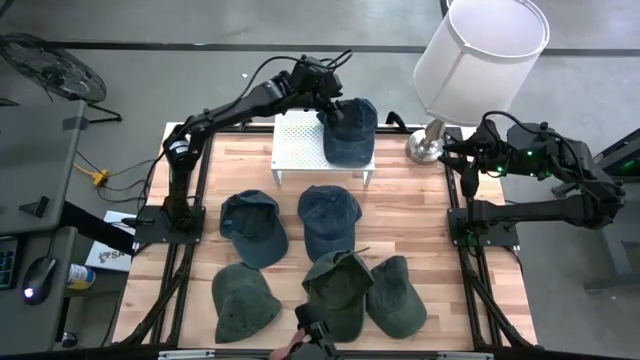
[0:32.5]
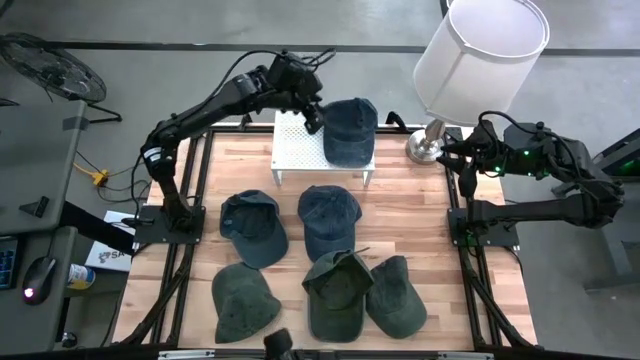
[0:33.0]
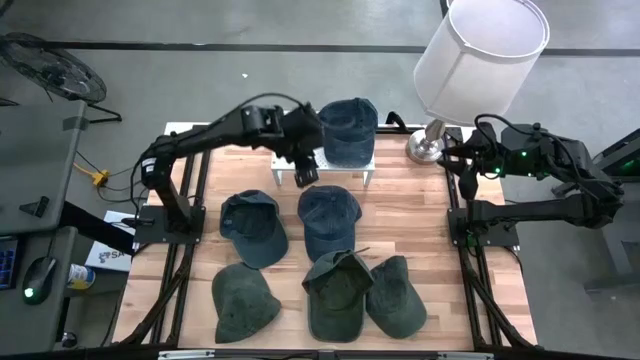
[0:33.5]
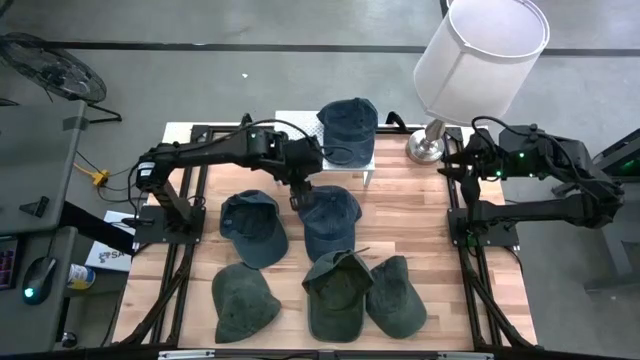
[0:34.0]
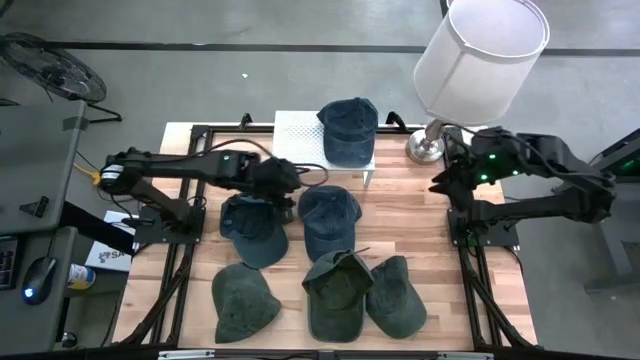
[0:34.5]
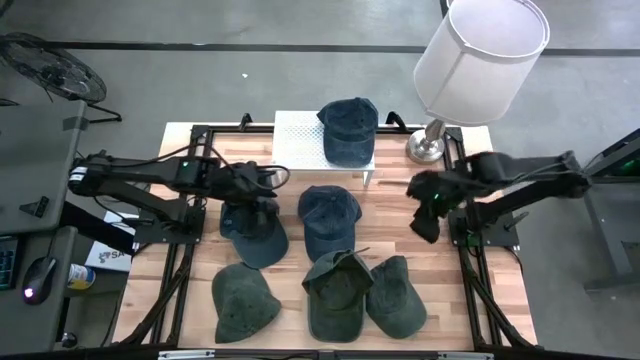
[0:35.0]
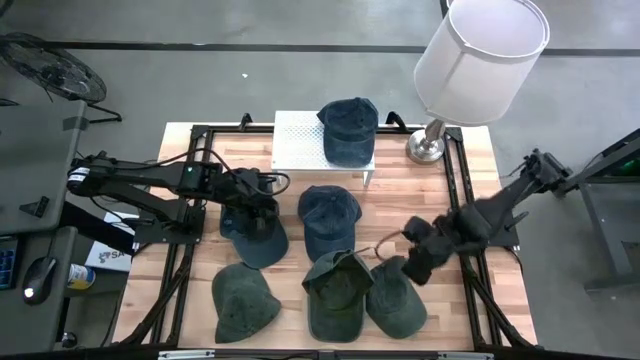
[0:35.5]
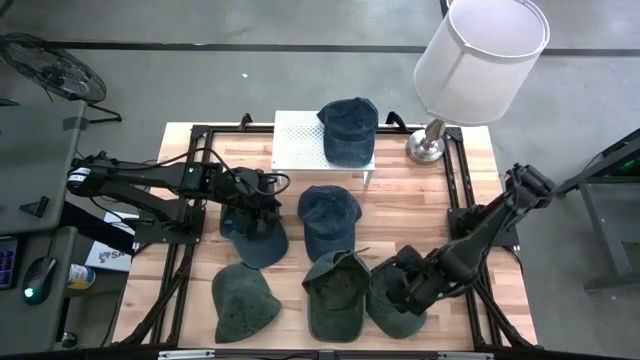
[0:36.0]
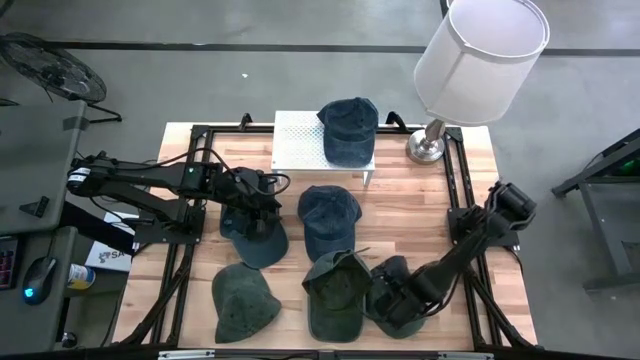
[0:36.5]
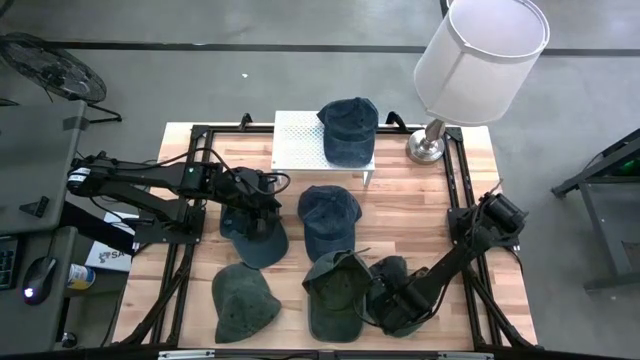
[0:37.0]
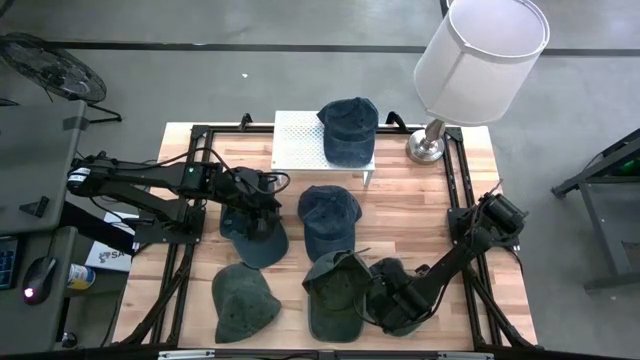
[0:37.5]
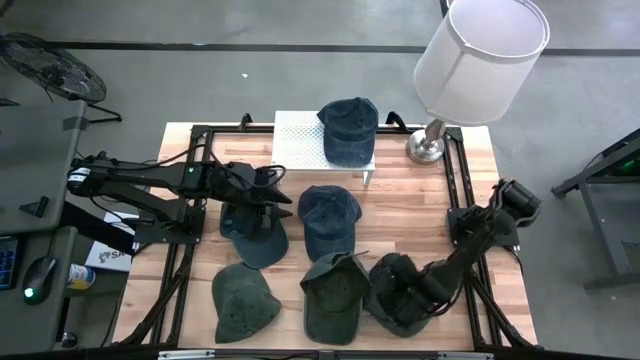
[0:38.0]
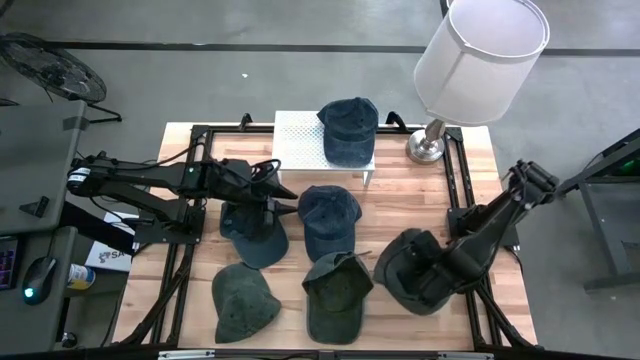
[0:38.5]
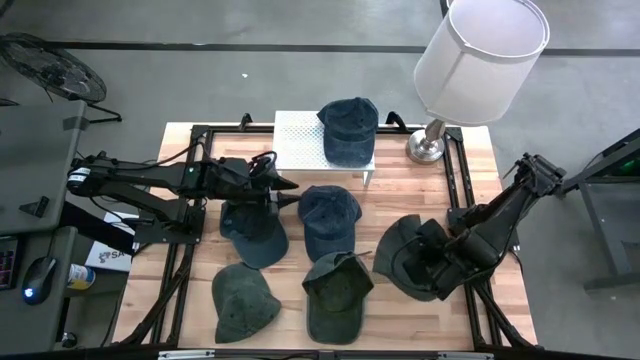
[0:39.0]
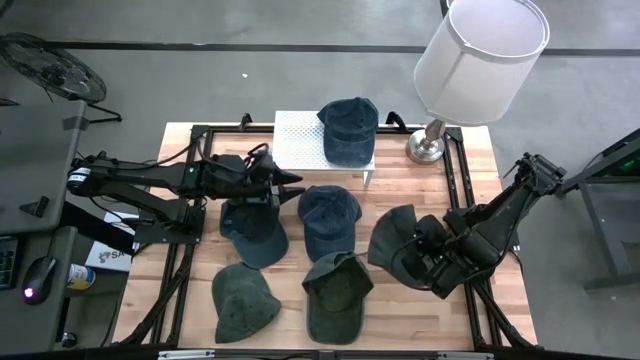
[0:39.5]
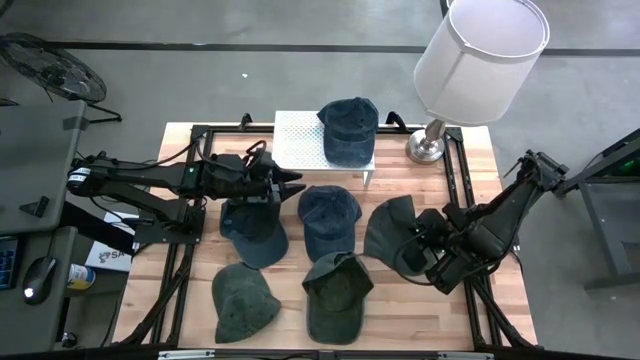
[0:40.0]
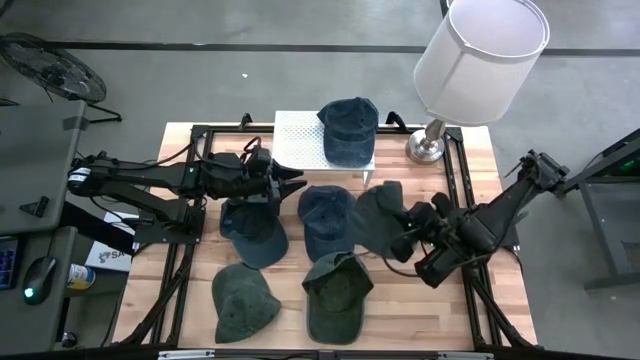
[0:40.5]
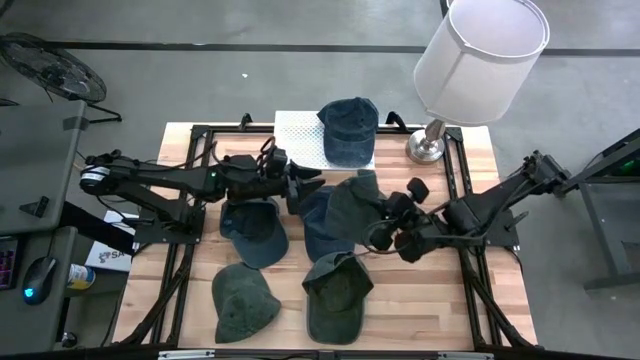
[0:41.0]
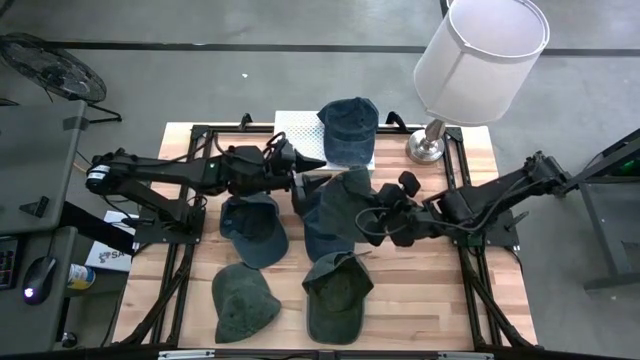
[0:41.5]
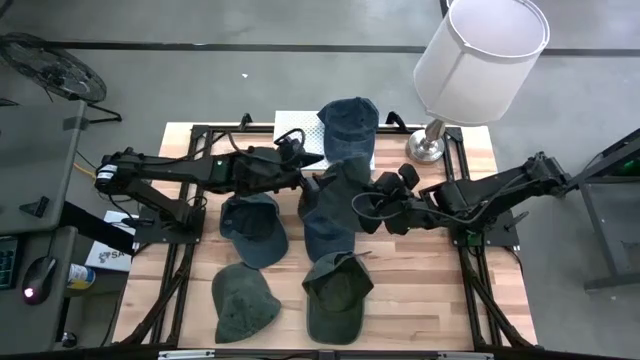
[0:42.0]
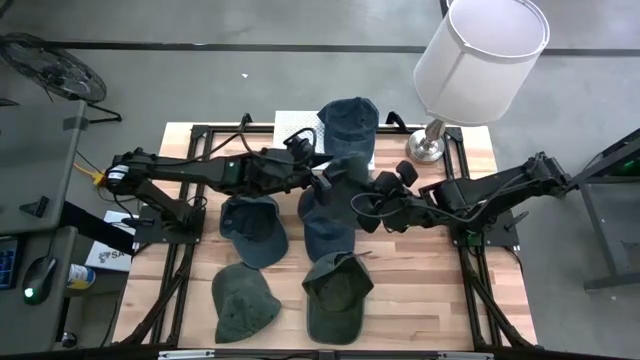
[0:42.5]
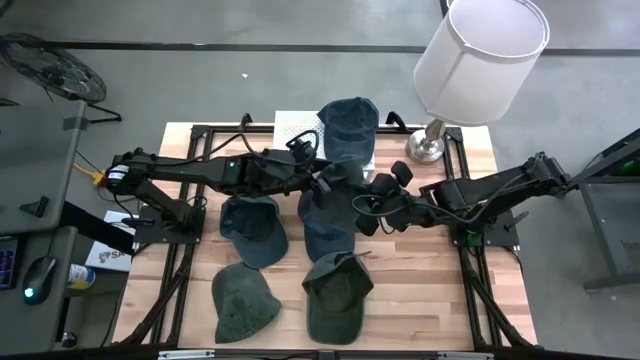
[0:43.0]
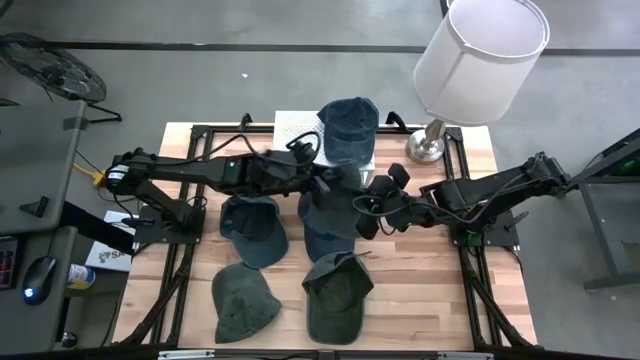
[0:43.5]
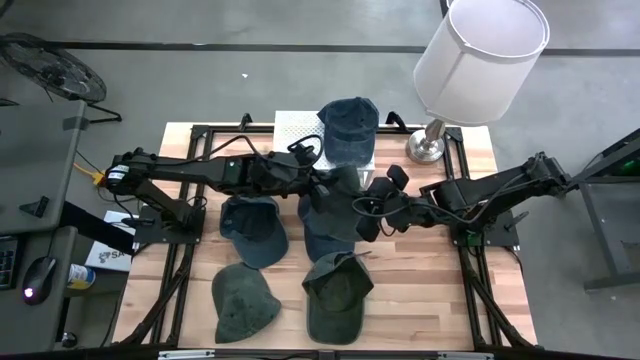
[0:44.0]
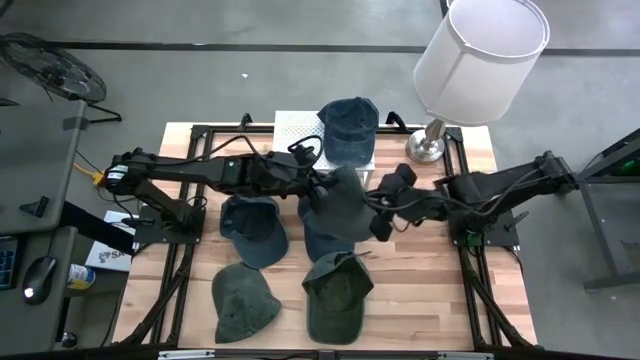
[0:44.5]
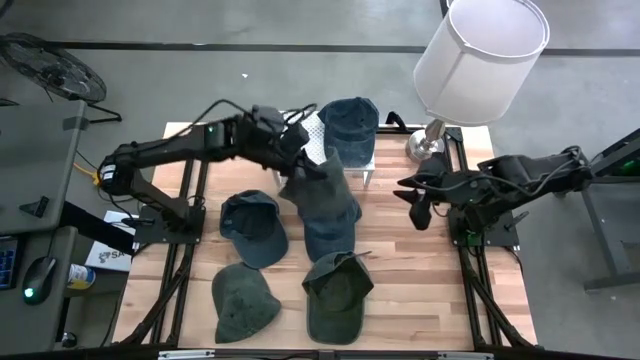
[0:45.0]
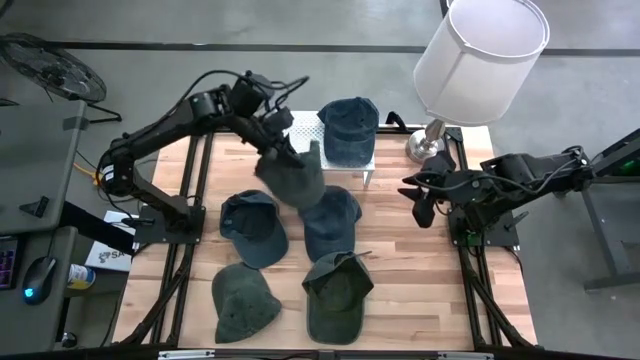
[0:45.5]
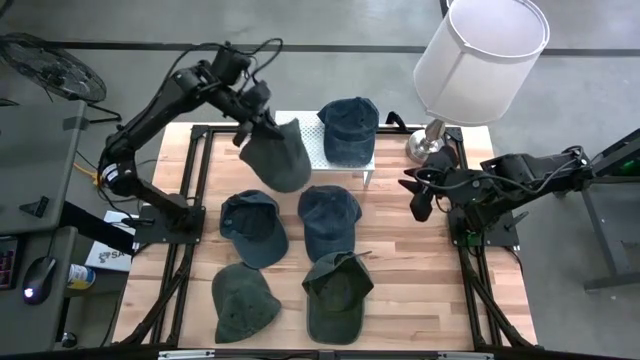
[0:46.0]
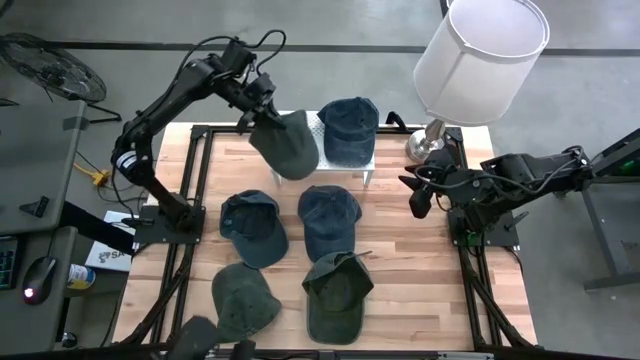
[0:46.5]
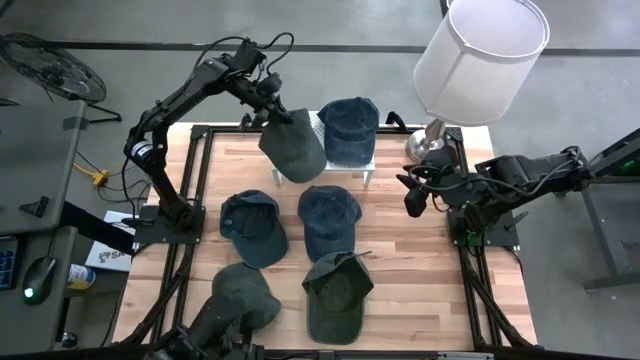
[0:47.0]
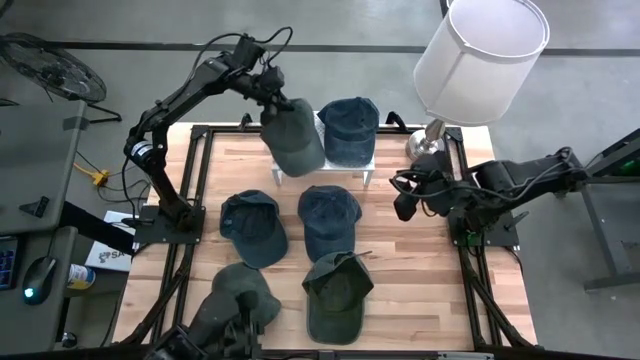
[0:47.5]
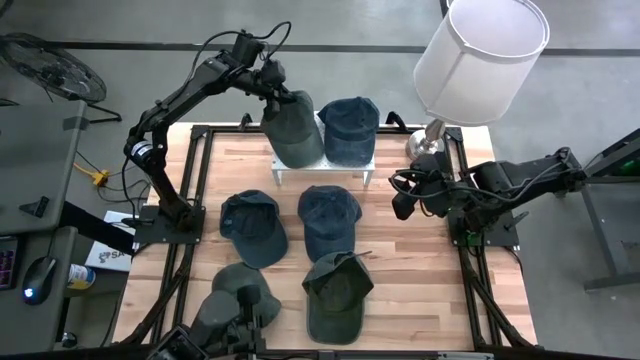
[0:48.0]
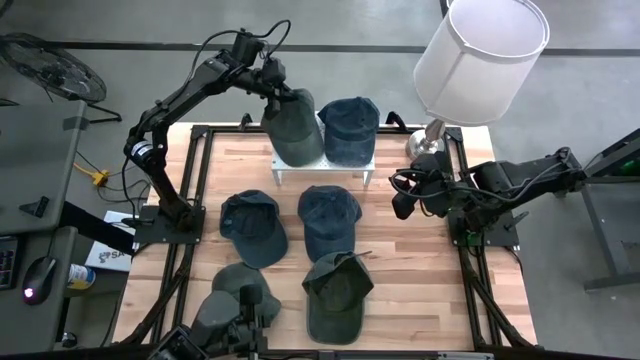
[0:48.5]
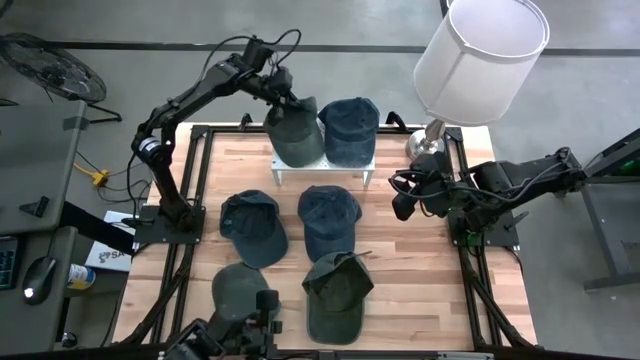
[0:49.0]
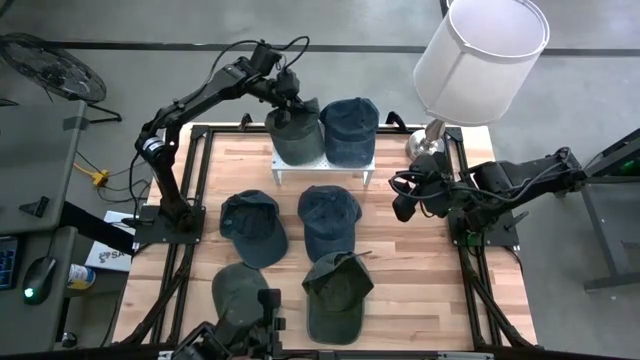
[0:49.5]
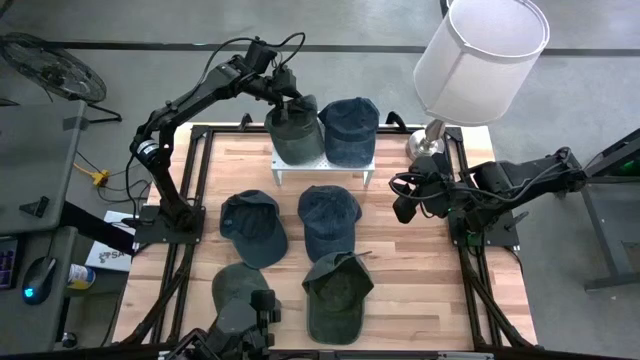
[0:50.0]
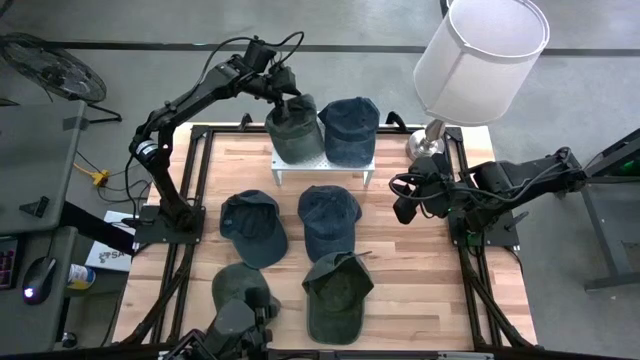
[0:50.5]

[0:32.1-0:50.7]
Task: Pick & Place hat
Put the right gray cap on the shelf

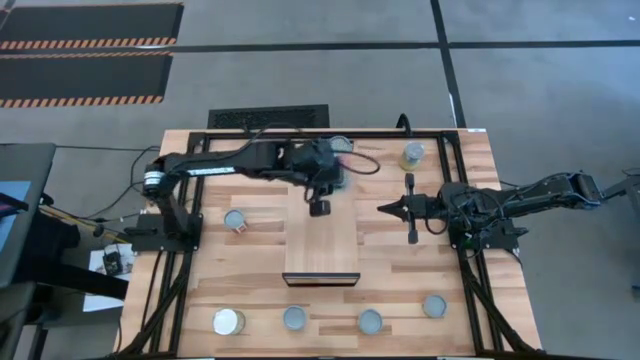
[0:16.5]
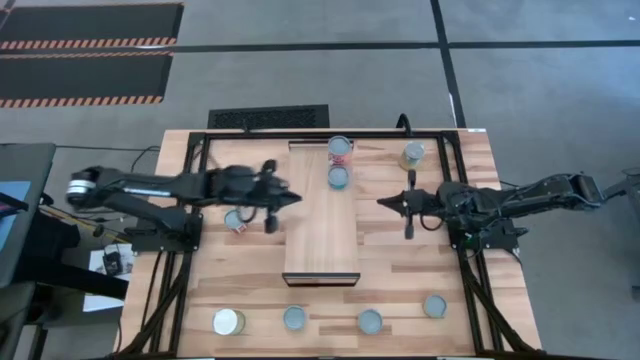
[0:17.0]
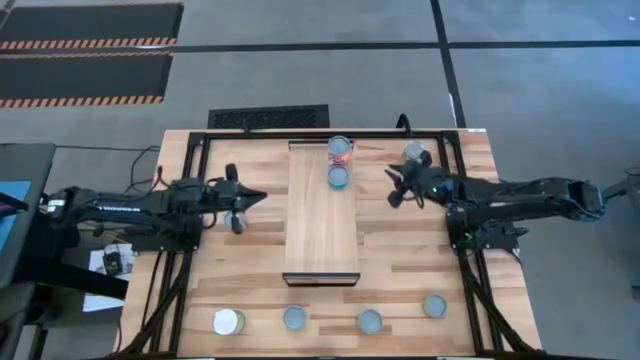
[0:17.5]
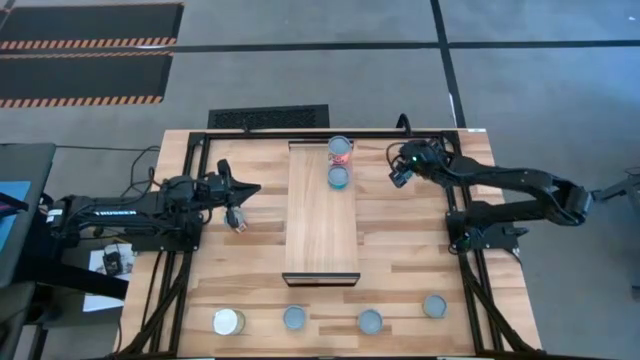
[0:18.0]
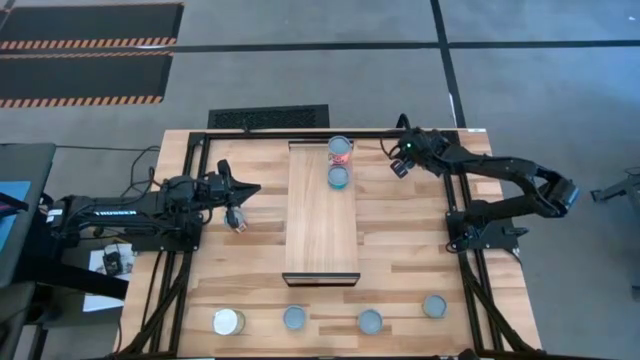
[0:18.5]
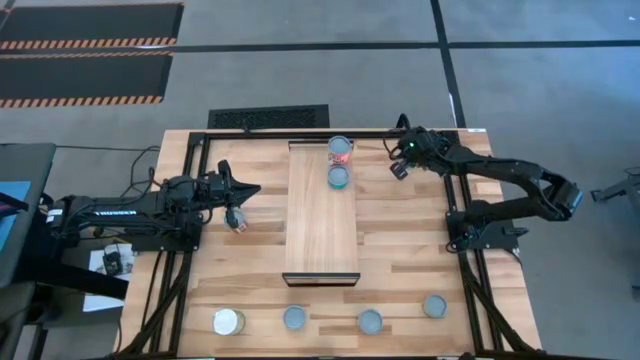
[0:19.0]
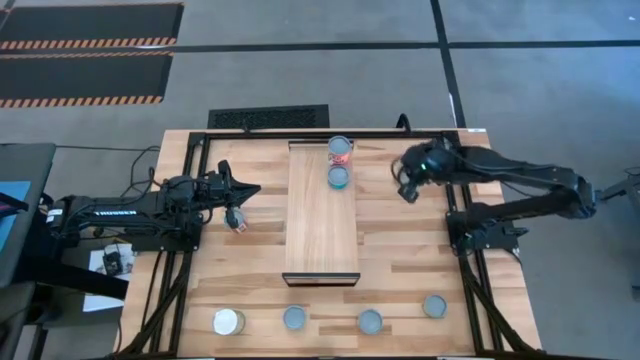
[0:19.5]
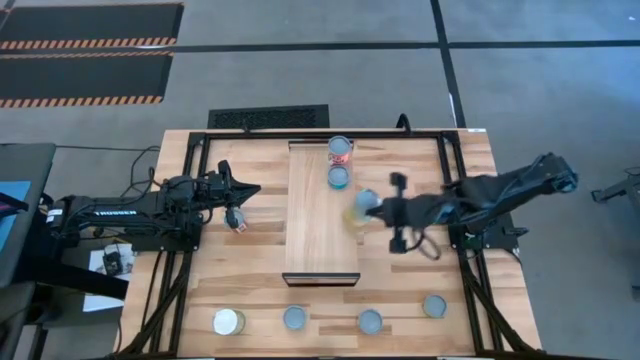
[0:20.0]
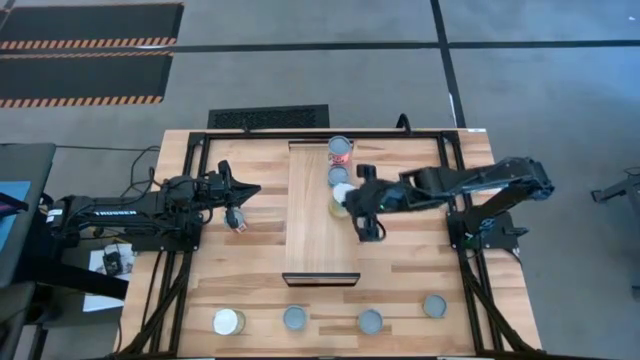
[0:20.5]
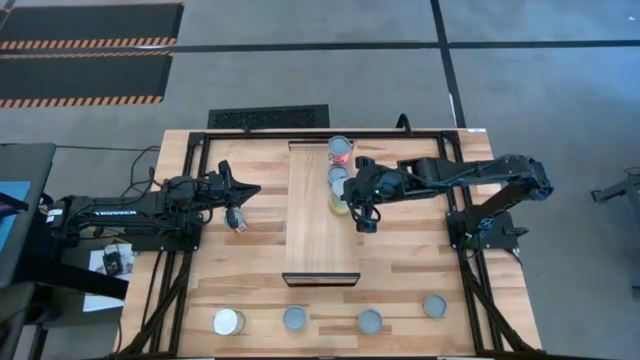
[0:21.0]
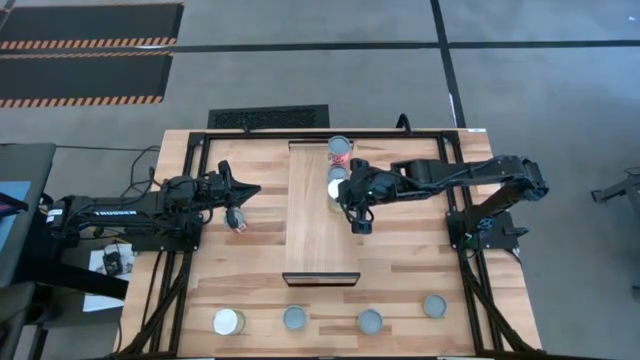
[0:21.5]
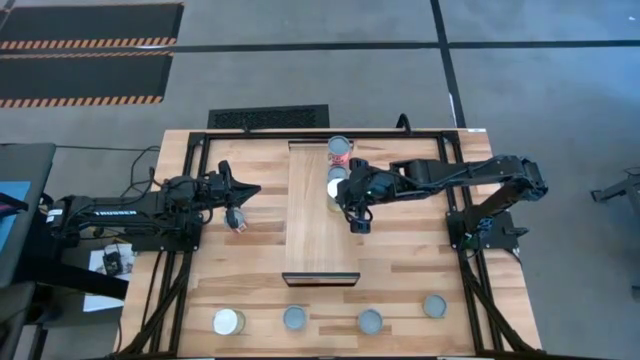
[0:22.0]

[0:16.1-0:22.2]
Task: Pick and place cans onto a shelf
Put the big blue can on the shelf
